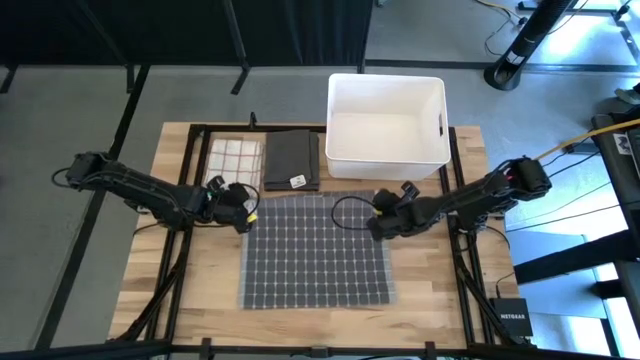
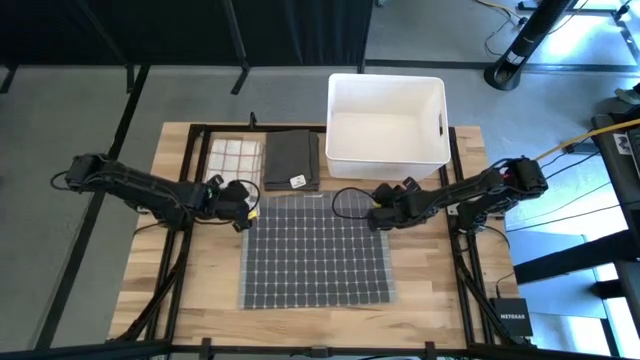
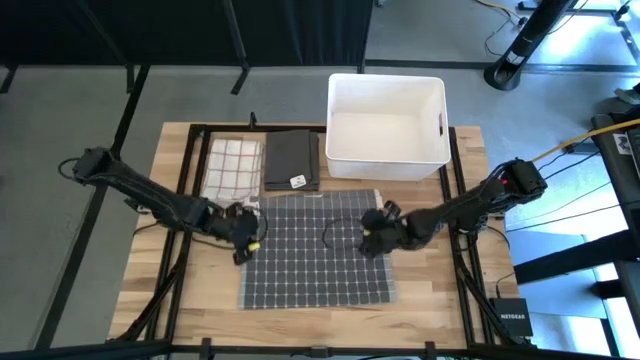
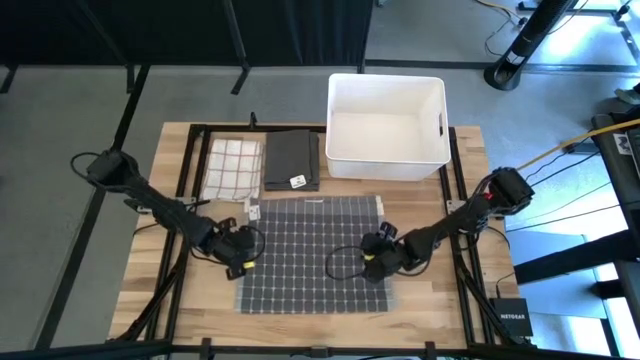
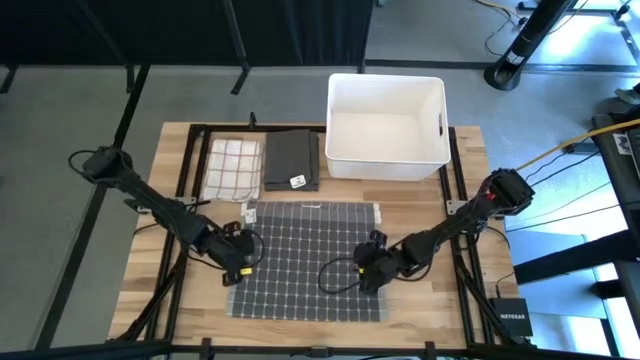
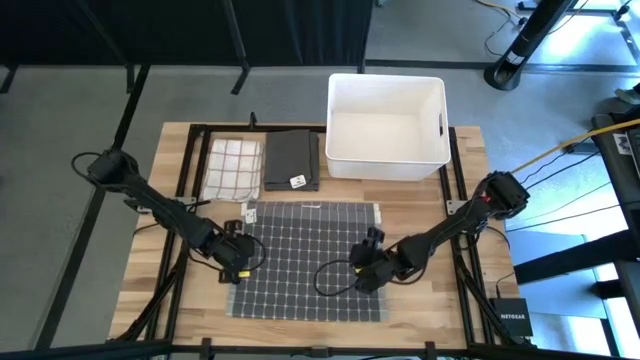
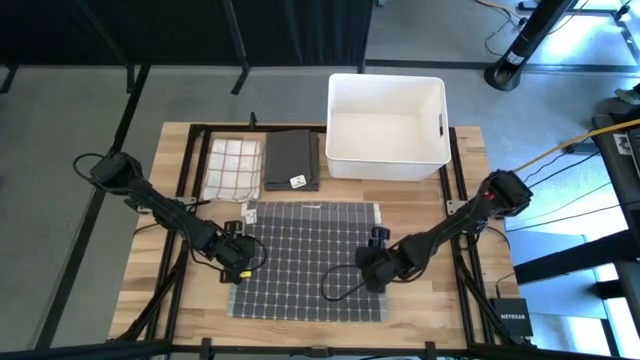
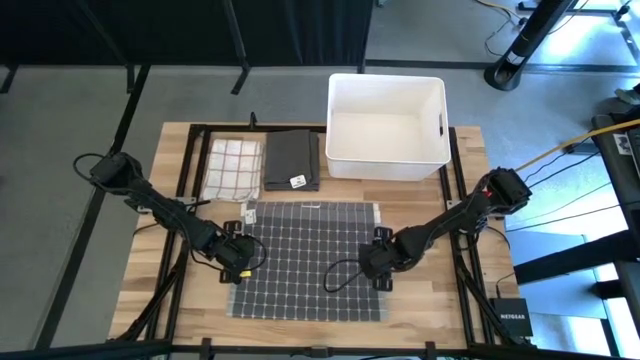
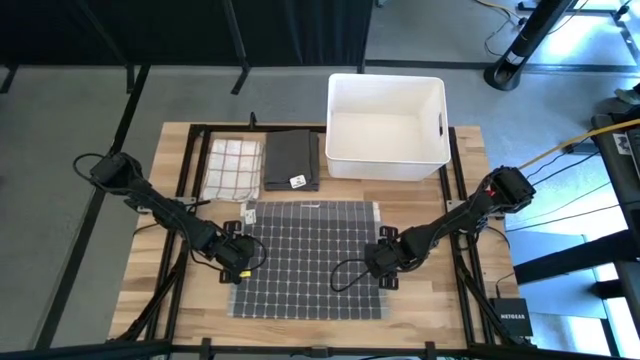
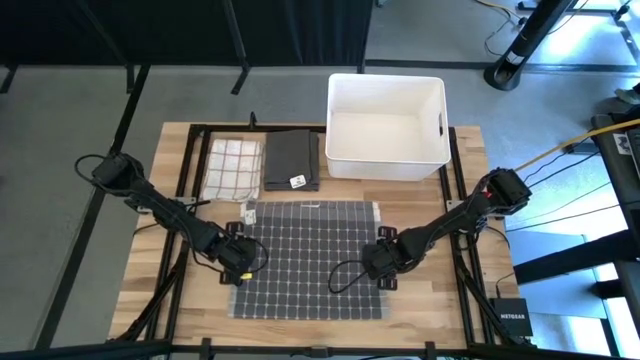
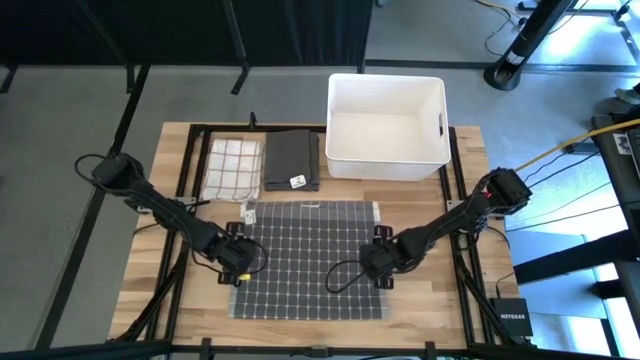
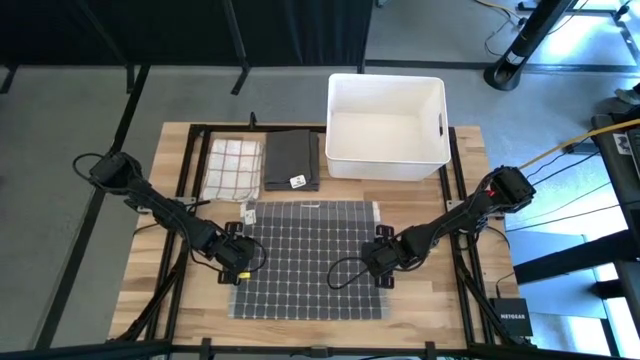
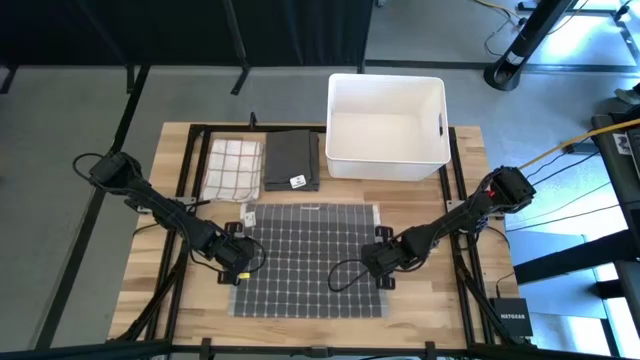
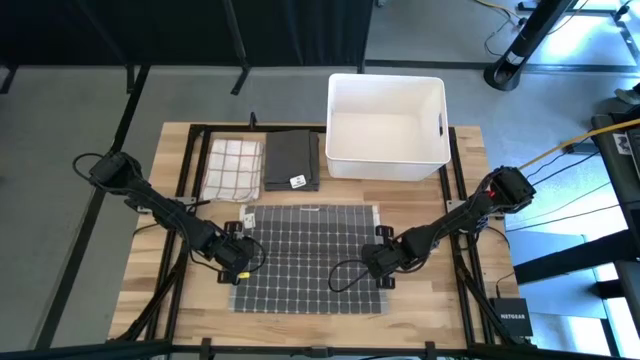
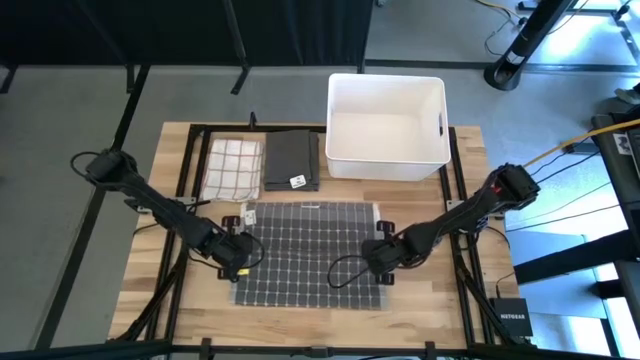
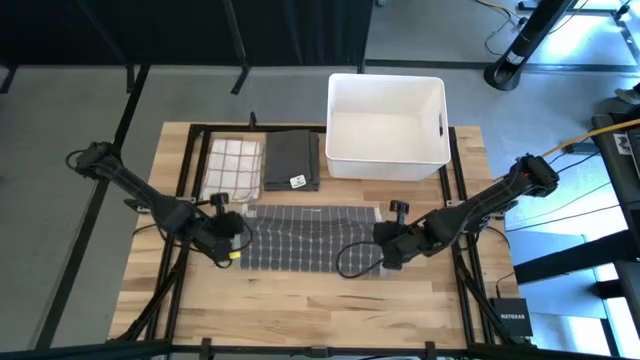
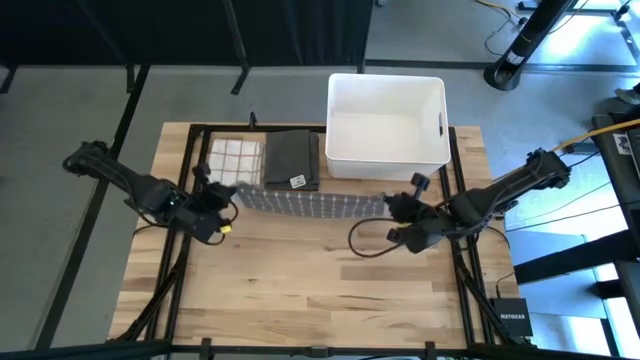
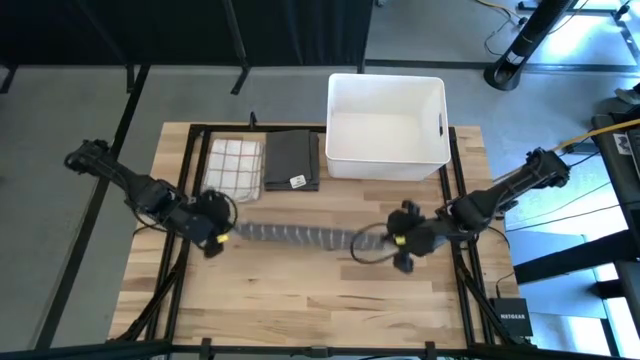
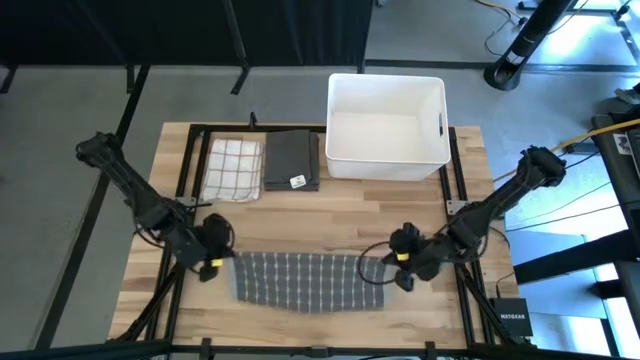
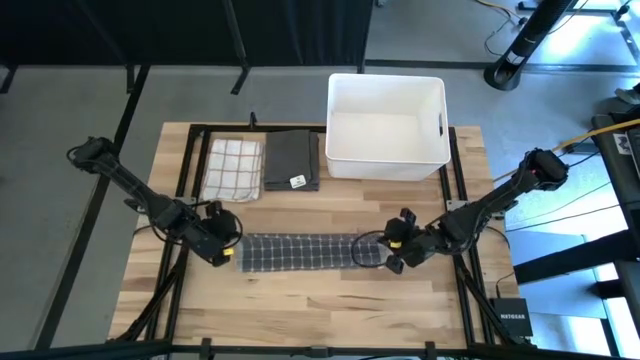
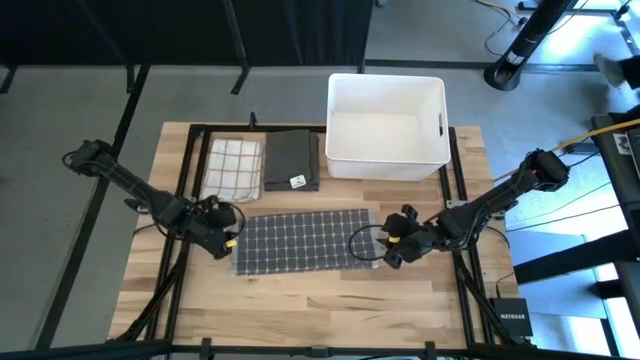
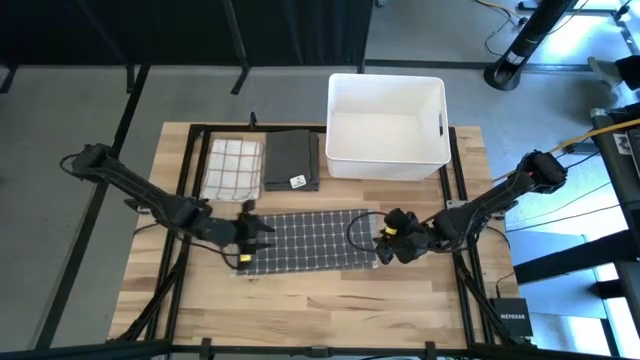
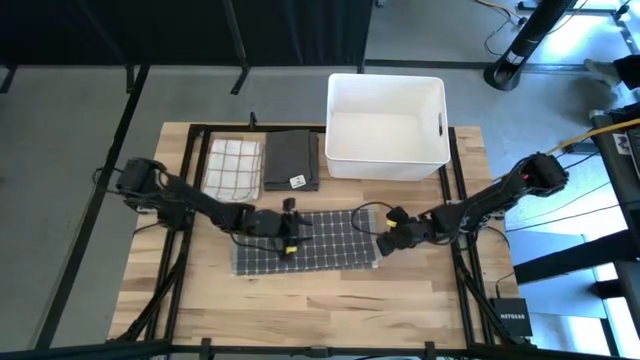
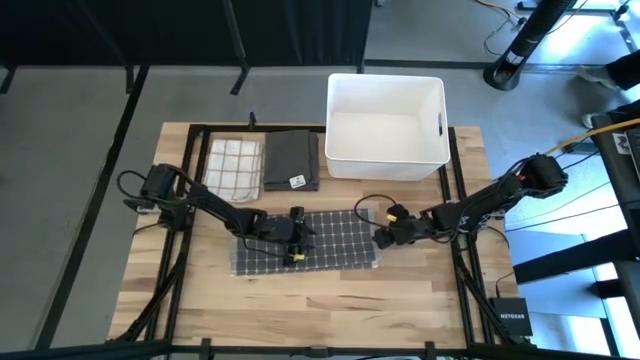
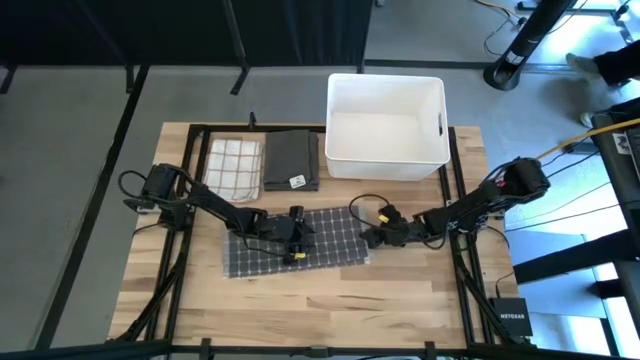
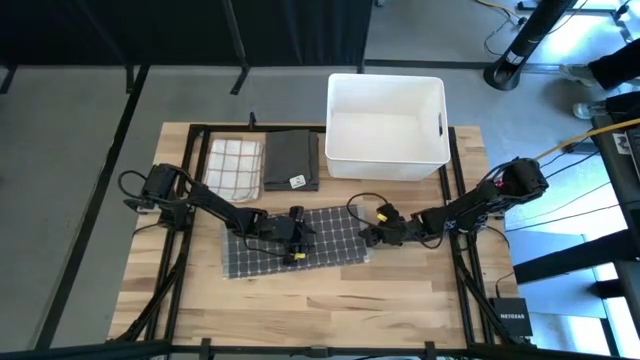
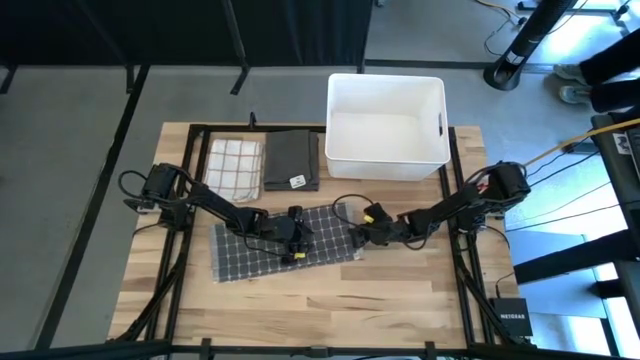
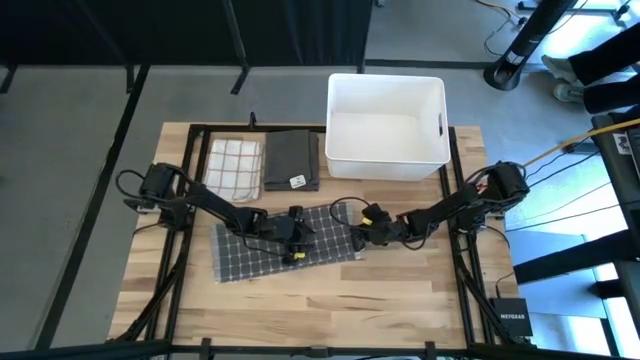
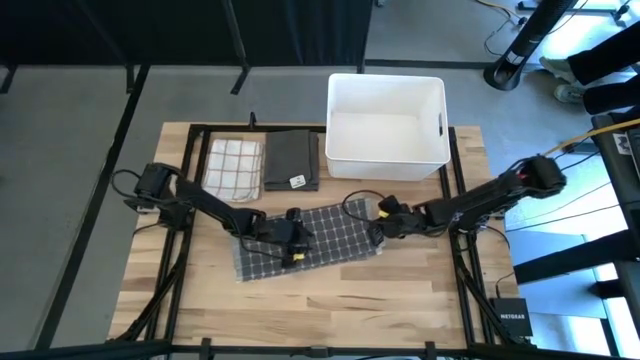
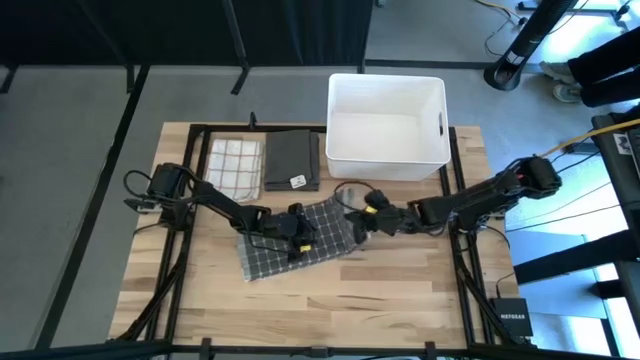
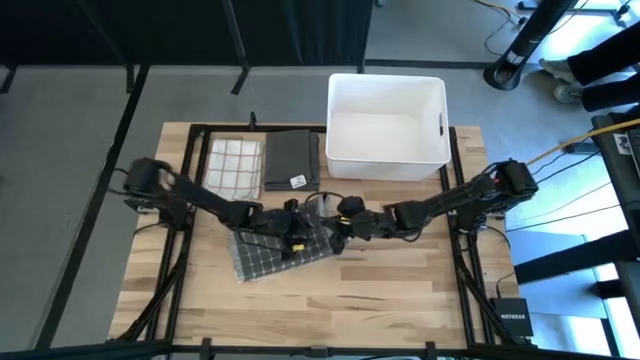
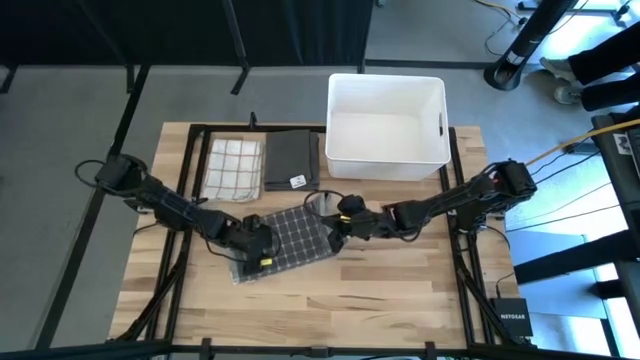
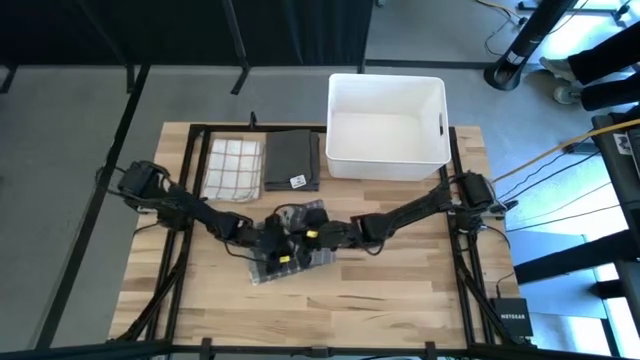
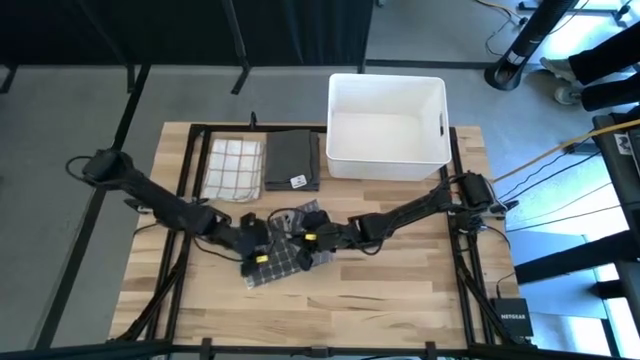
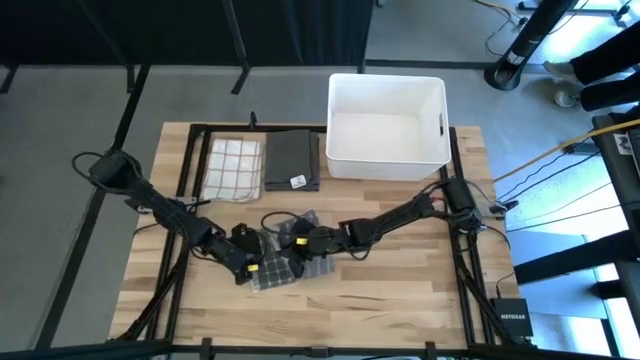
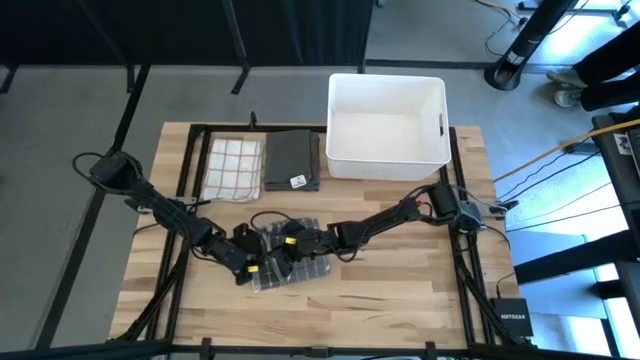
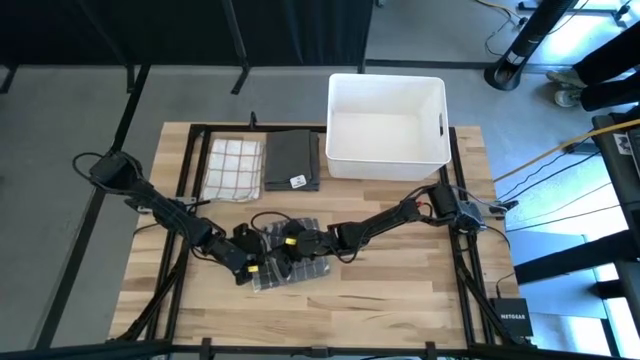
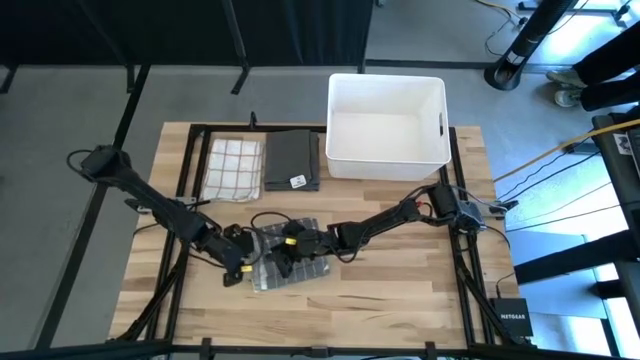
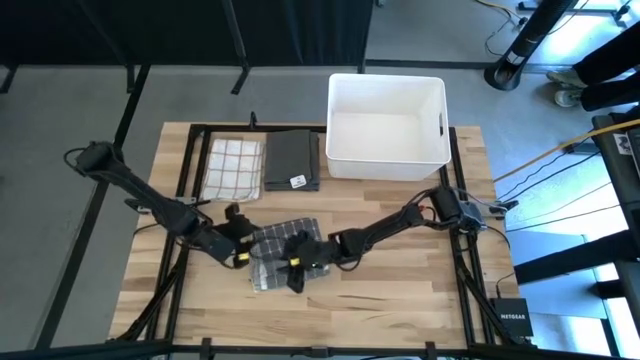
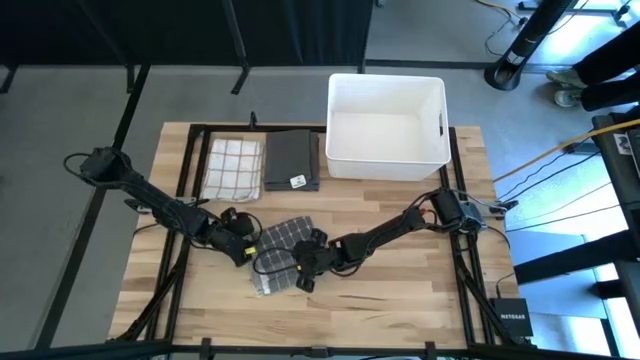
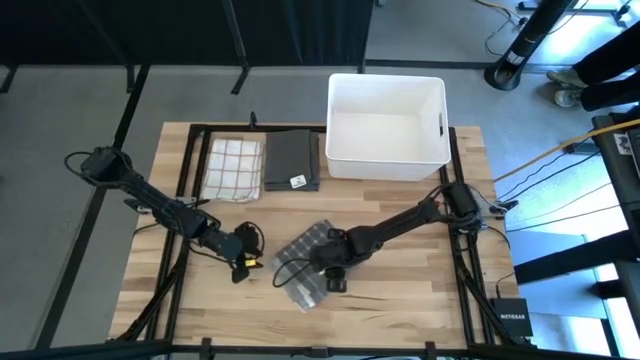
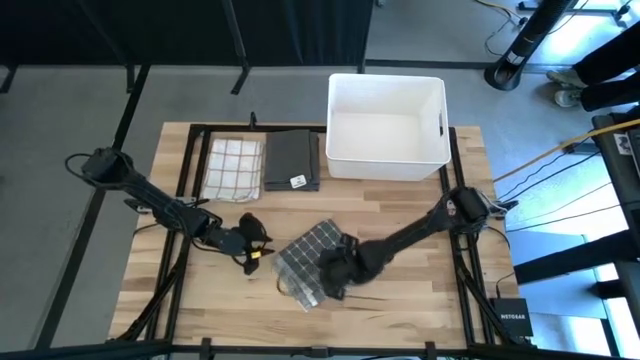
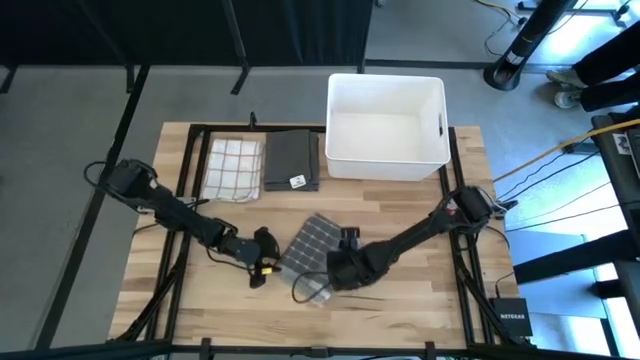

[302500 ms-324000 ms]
Task: Fold towel
Fold the grey patterned towel
